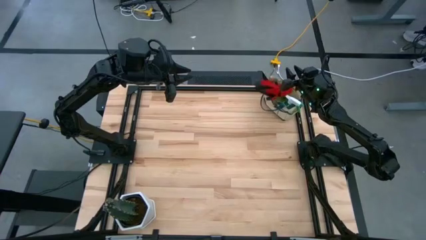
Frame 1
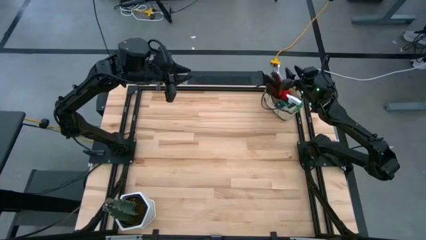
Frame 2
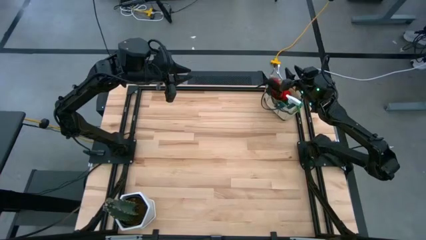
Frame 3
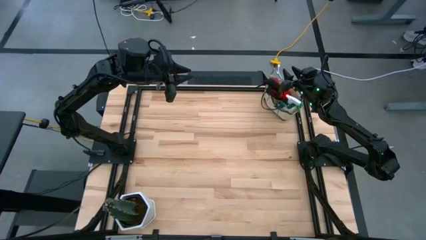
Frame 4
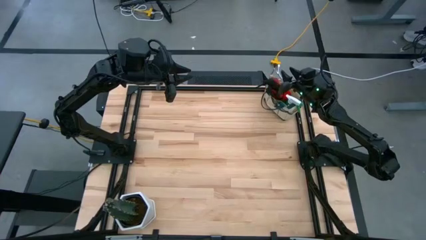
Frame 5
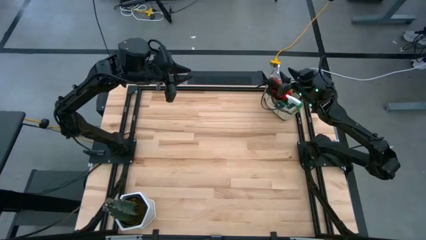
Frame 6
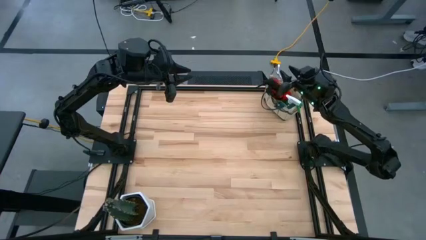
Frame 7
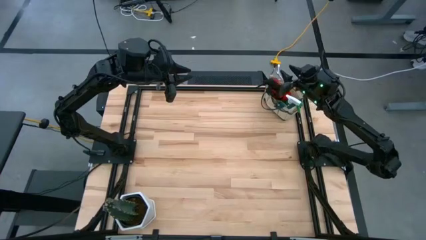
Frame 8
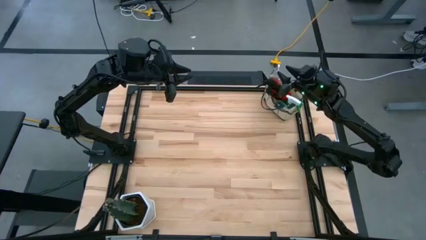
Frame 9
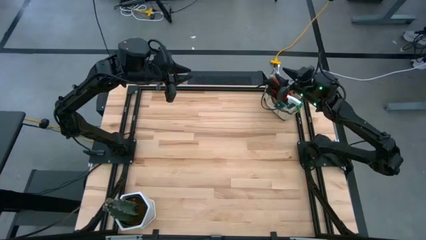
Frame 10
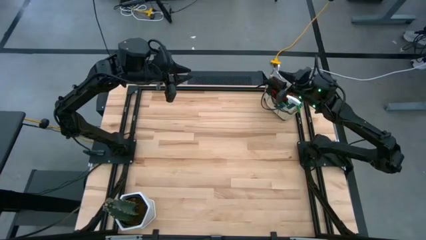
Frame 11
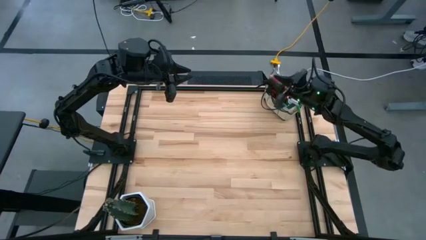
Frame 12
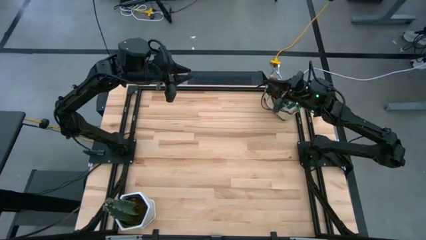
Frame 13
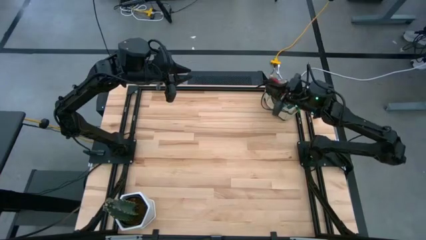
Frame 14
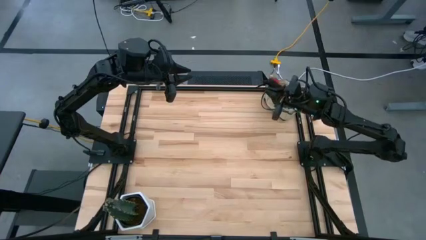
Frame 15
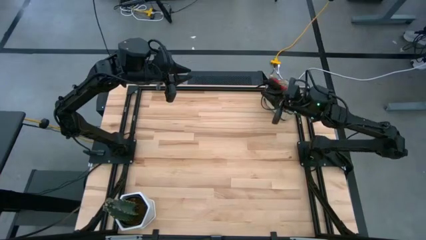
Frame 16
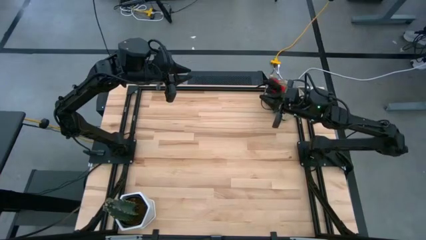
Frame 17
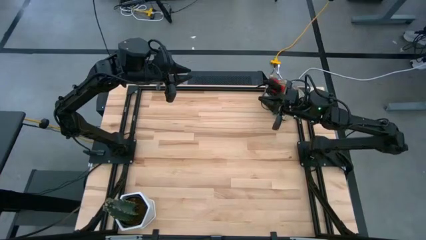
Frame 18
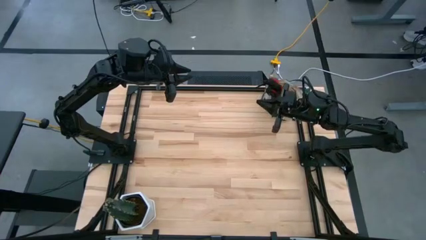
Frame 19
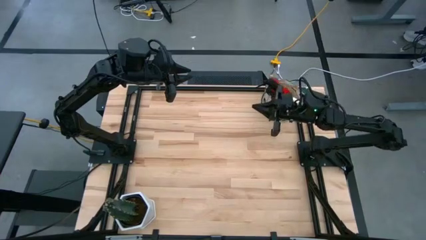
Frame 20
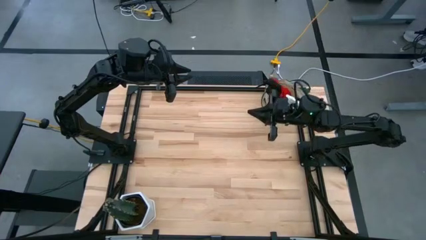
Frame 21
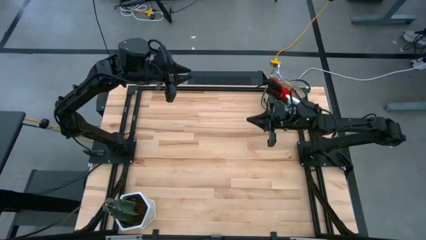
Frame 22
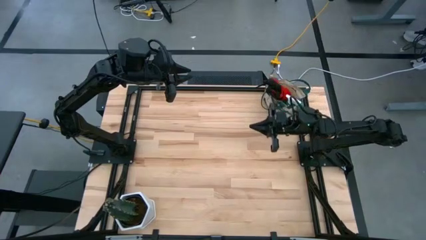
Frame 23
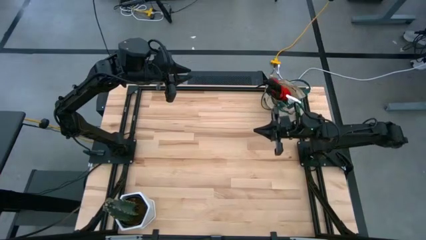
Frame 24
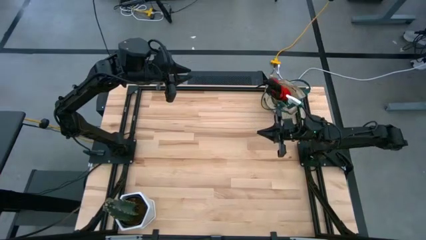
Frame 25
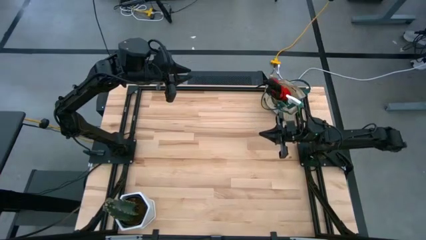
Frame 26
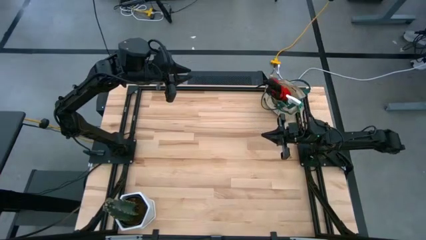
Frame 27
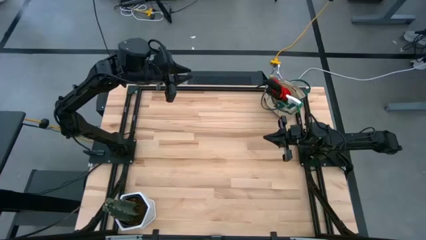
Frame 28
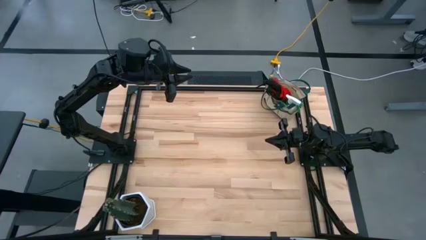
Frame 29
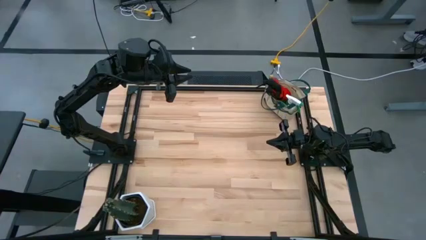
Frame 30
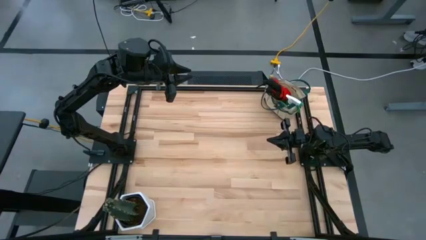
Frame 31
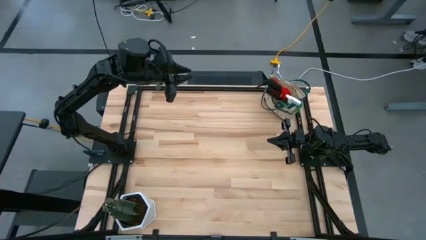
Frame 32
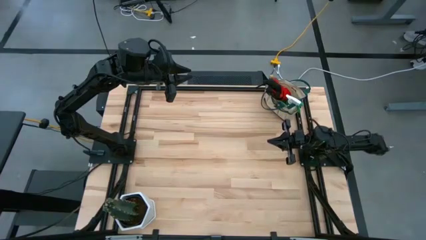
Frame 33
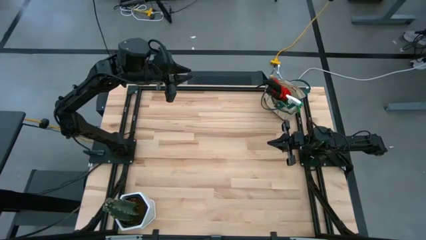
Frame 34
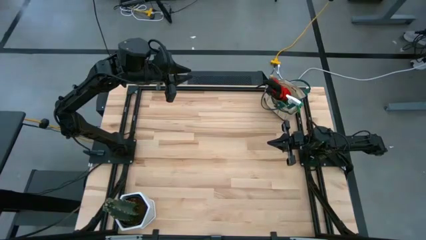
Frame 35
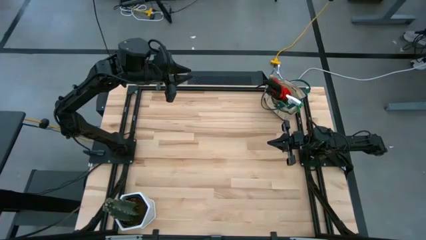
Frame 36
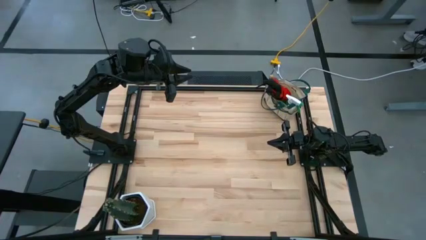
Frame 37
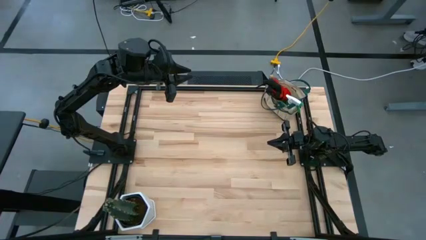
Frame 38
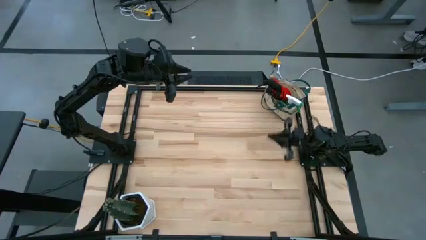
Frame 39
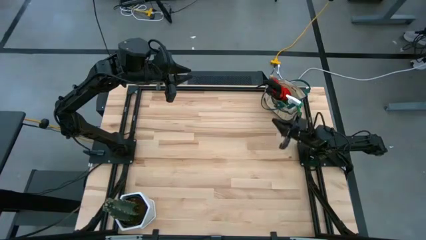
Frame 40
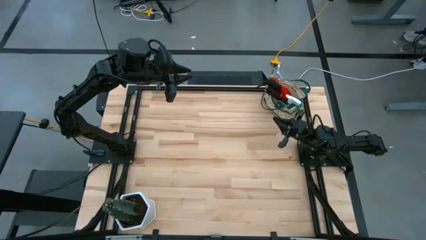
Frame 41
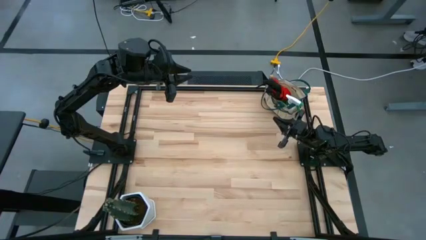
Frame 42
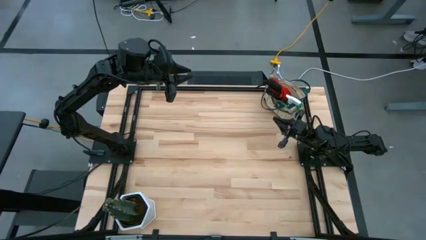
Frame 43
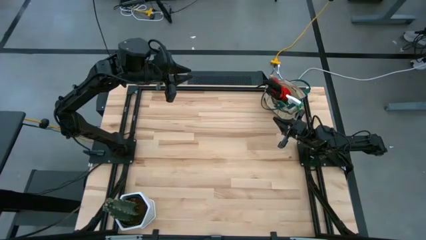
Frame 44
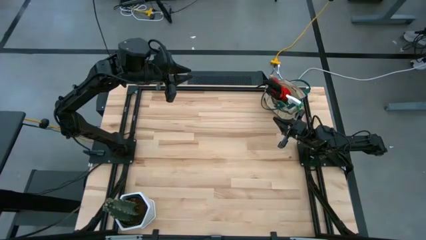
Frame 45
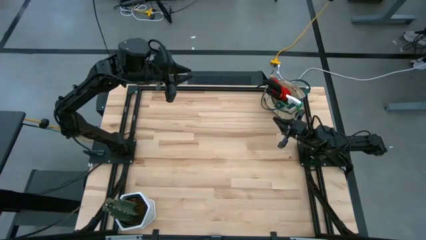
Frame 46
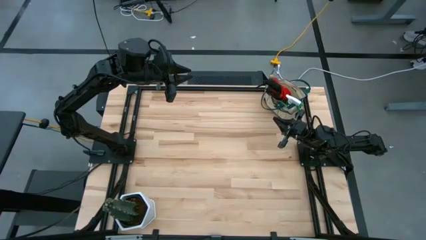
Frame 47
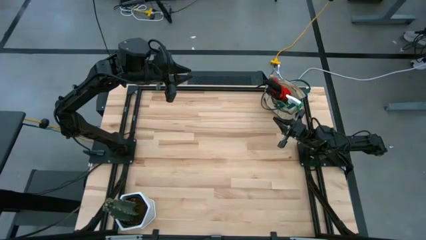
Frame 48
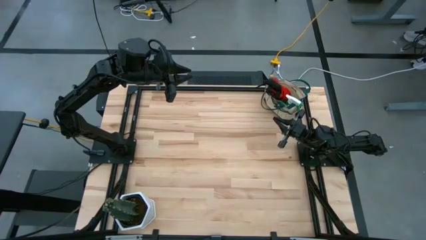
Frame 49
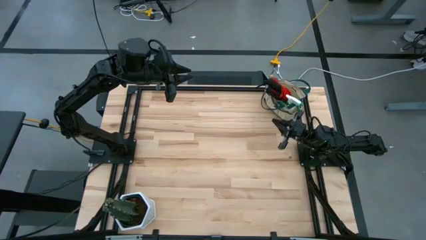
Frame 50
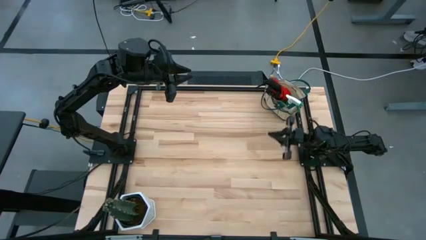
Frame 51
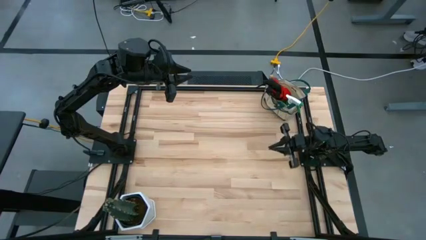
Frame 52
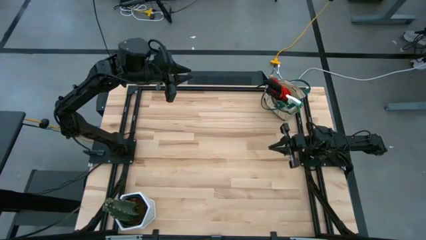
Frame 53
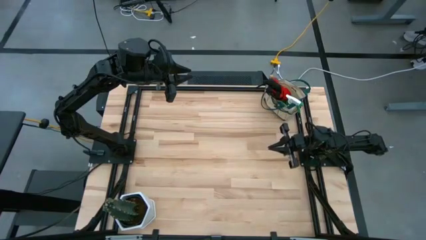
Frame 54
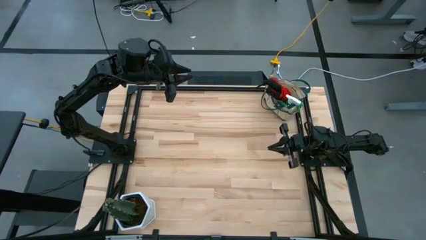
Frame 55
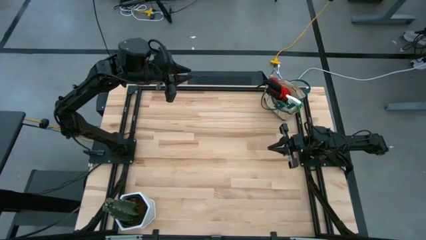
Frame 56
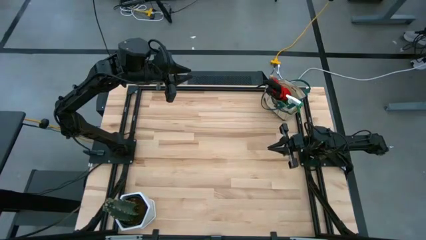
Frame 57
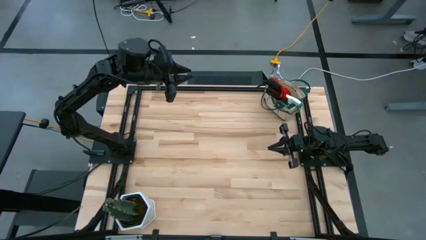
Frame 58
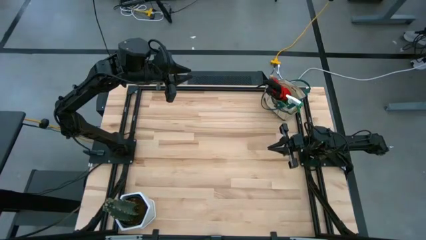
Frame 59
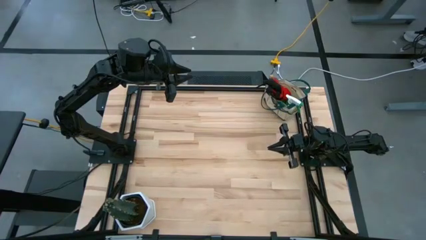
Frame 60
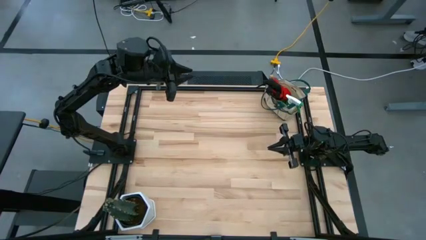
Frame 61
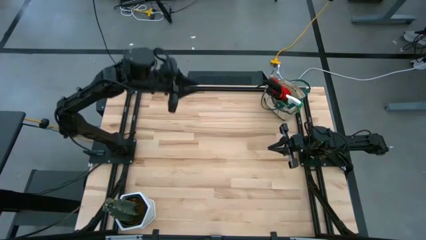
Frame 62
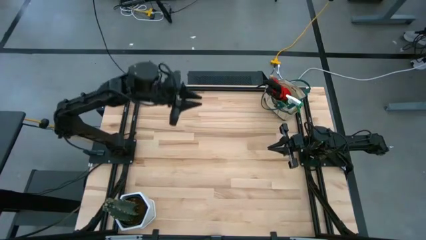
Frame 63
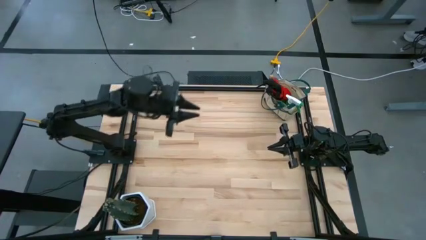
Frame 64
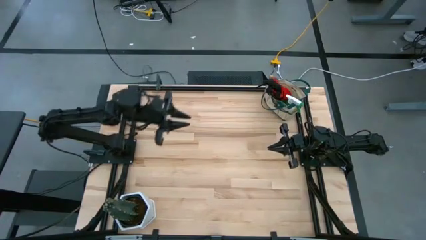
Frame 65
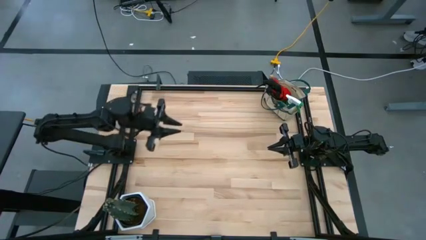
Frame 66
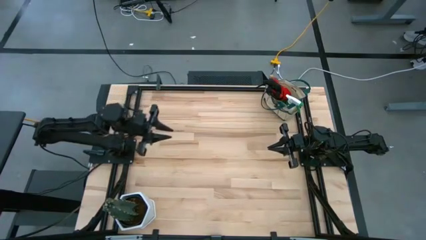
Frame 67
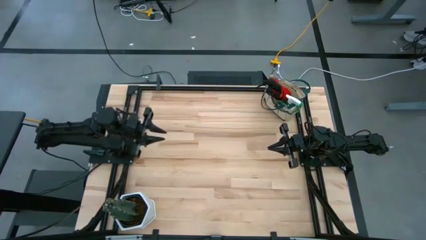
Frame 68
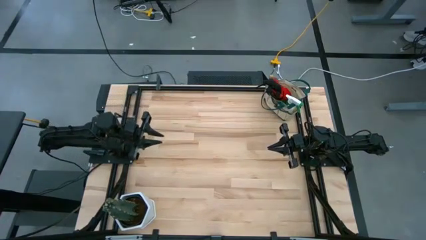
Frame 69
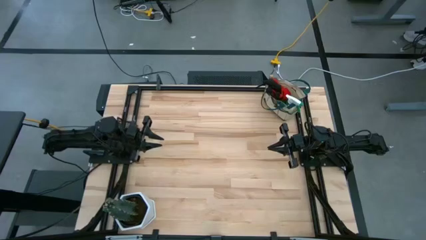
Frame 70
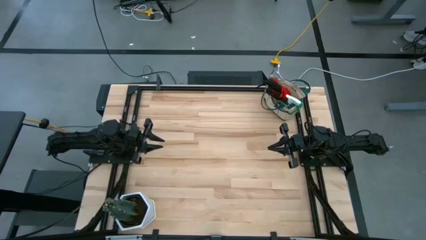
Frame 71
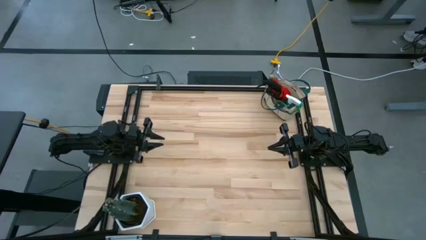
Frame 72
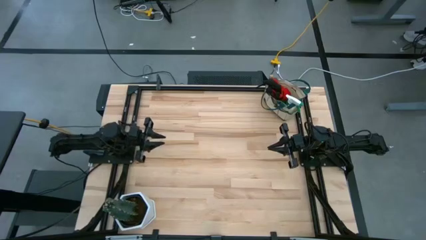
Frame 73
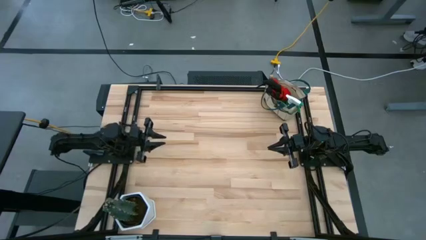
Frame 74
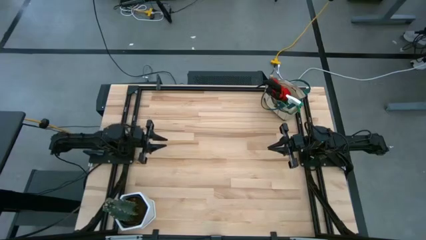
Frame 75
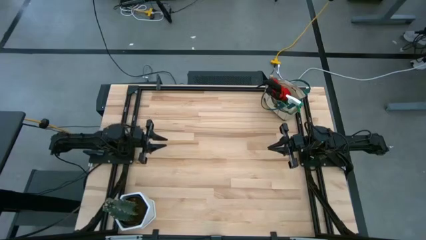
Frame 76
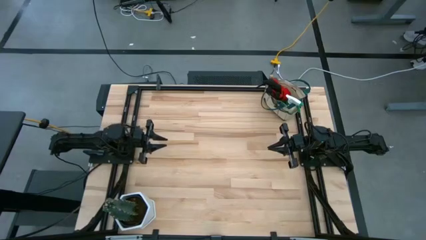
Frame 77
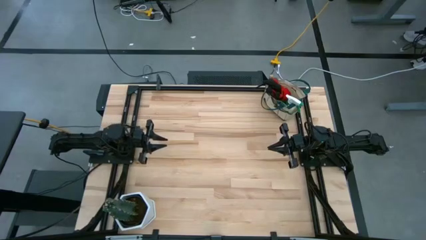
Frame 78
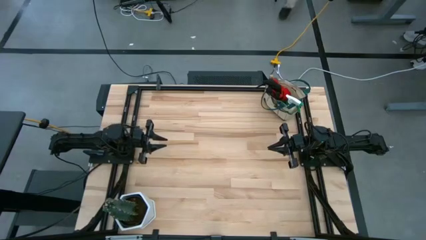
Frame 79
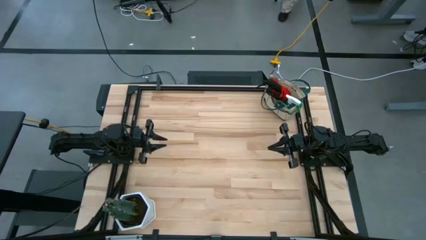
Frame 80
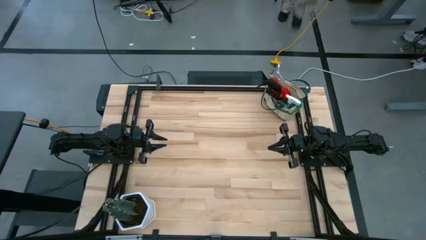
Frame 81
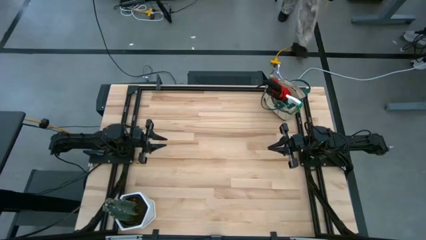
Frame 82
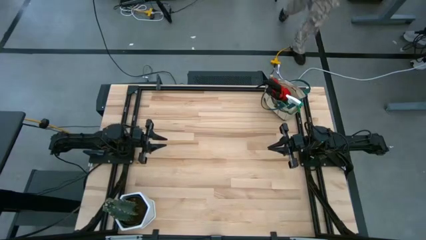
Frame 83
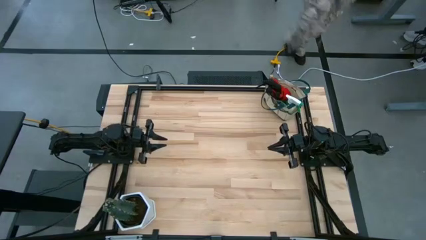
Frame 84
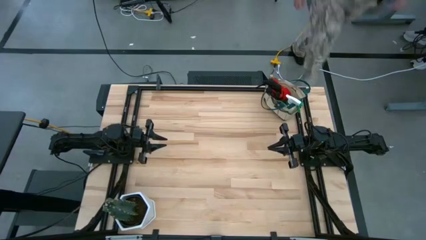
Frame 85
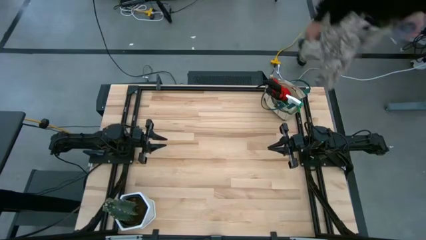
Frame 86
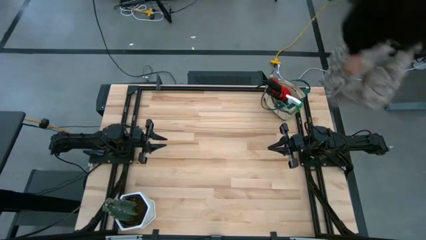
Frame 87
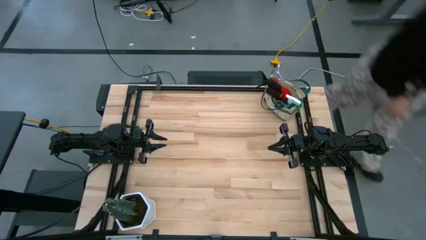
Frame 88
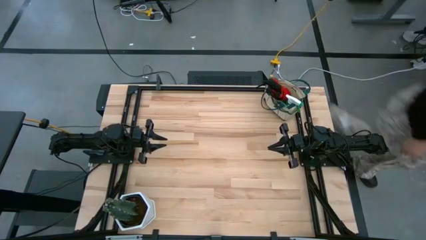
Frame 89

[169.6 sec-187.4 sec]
Task: Pick & Place Garden tools in Gardening bag
Return to Home Position
